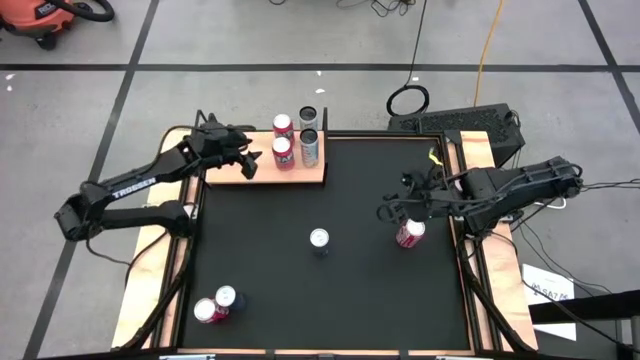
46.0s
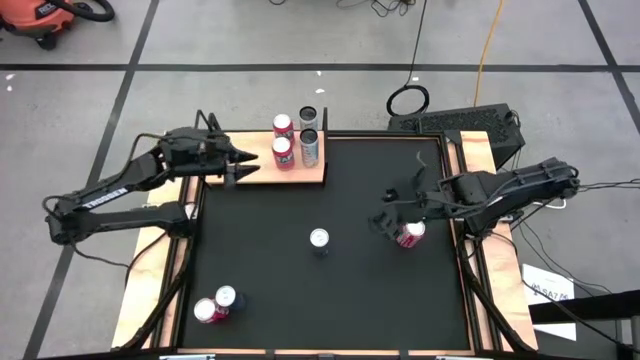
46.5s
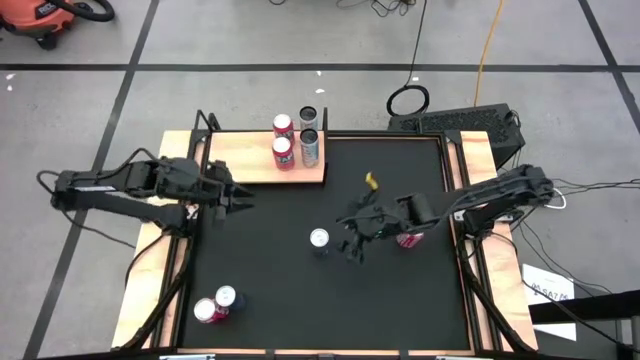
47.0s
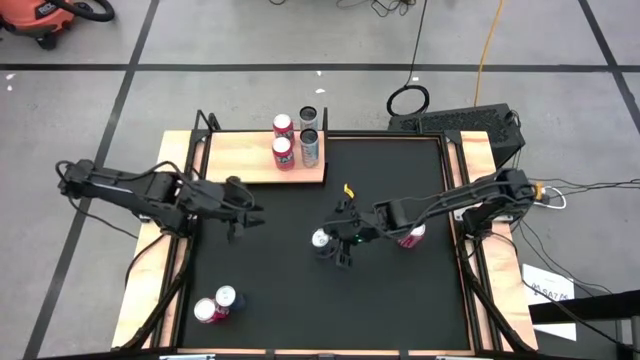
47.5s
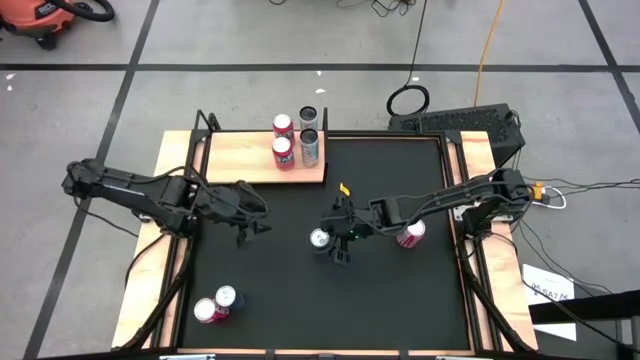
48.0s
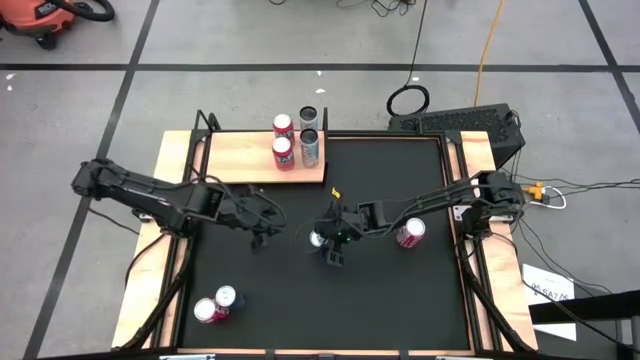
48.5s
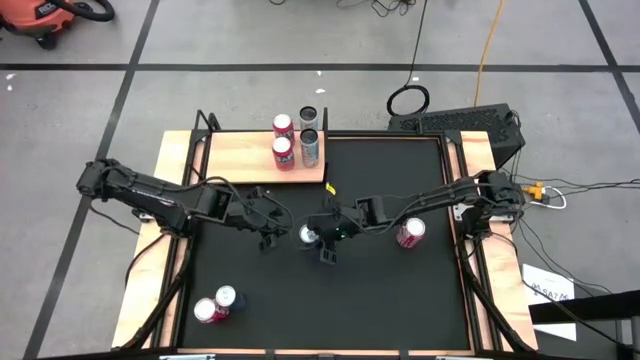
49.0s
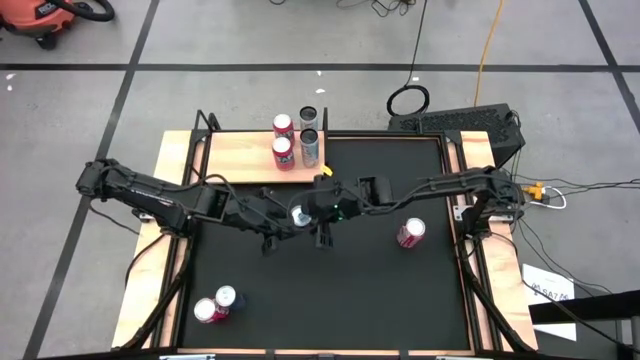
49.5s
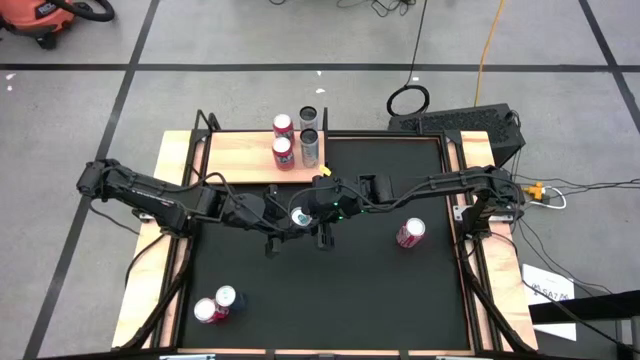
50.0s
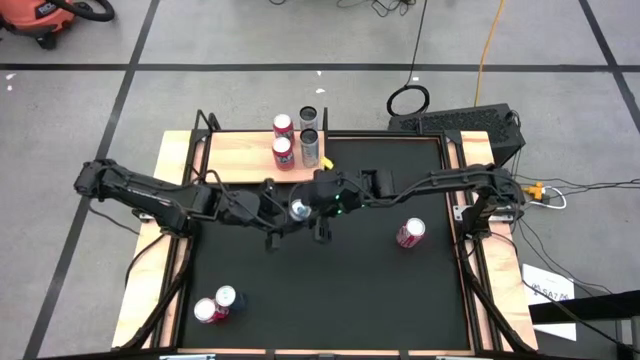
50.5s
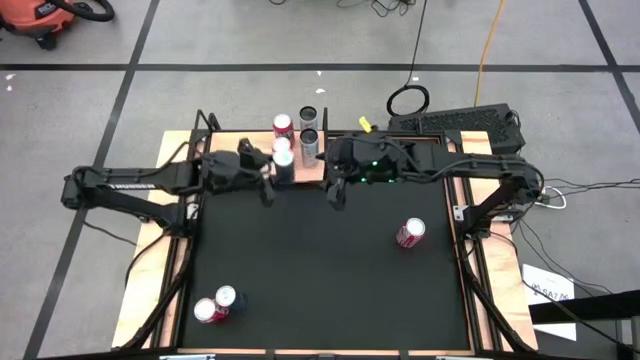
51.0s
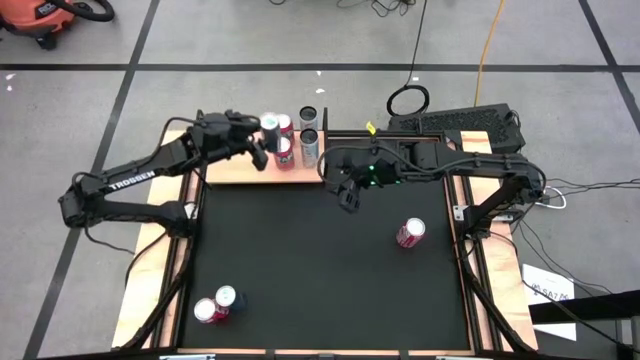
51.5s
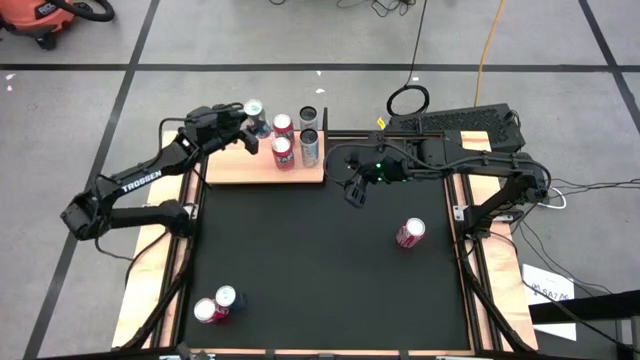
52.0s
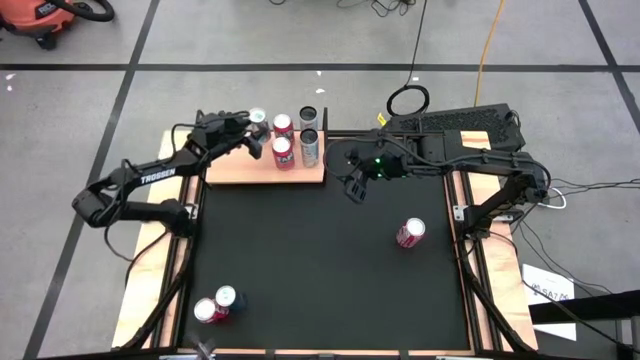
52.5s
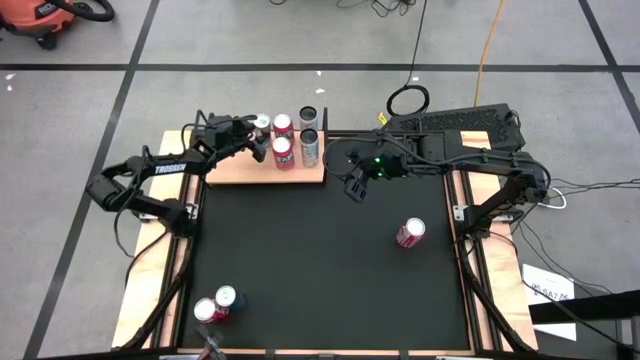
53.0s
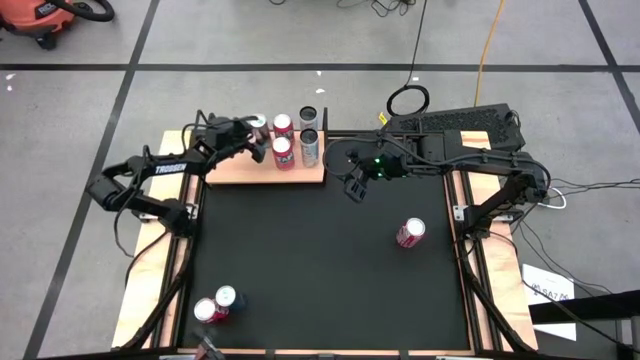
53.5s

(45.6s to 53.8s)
Task: Place canned beverage on shelf
Put the top blue soda can on the shelf

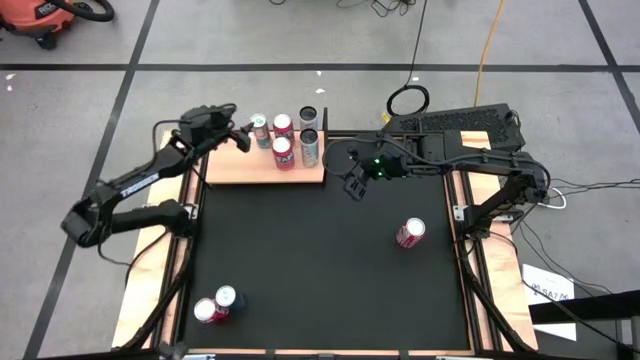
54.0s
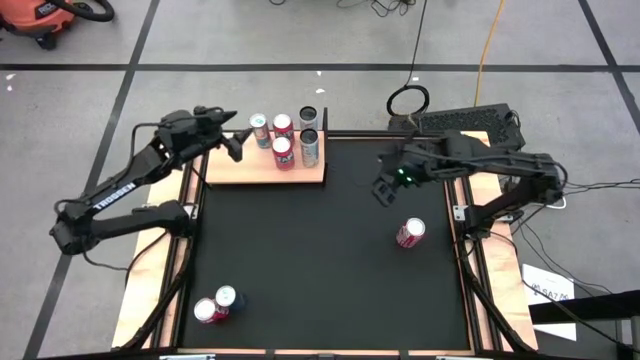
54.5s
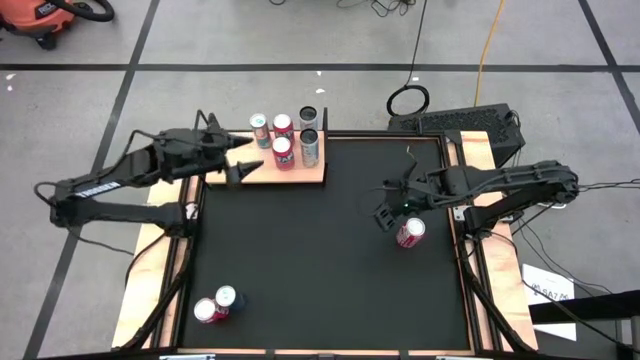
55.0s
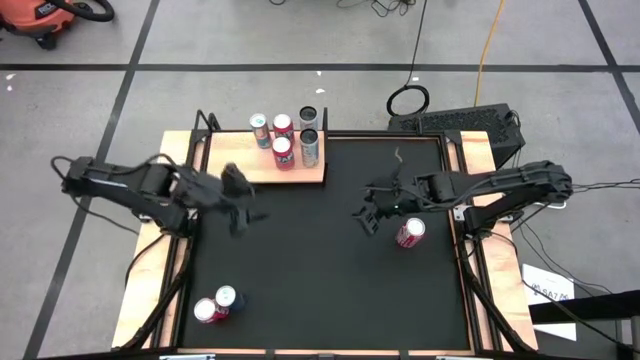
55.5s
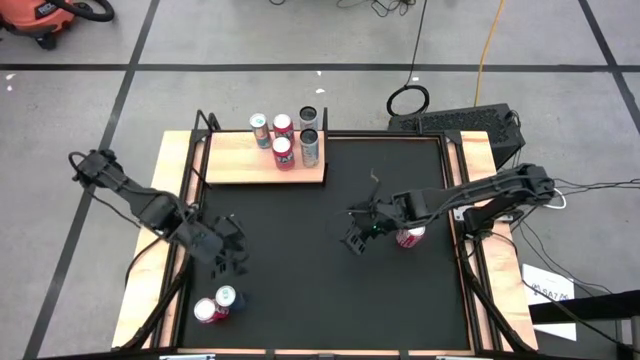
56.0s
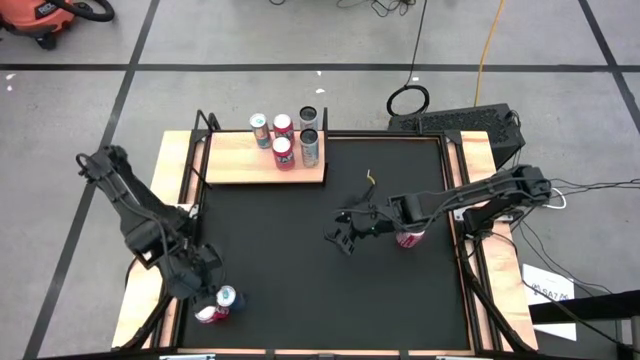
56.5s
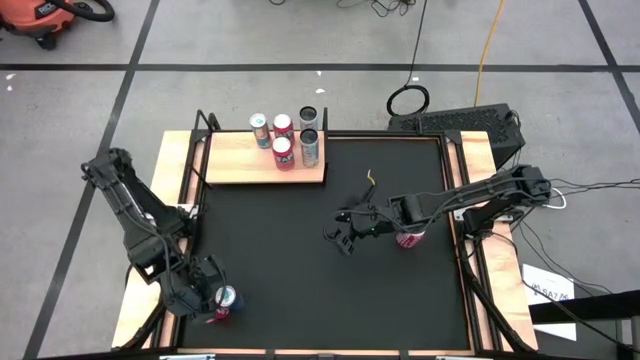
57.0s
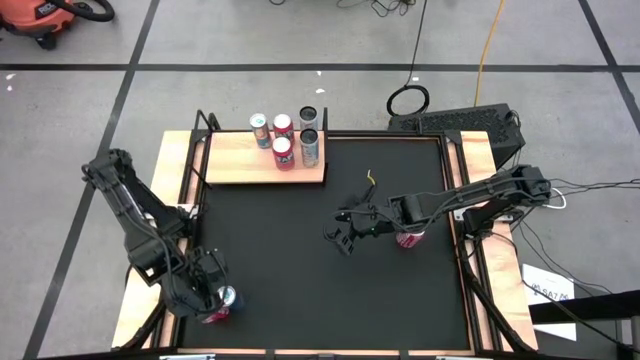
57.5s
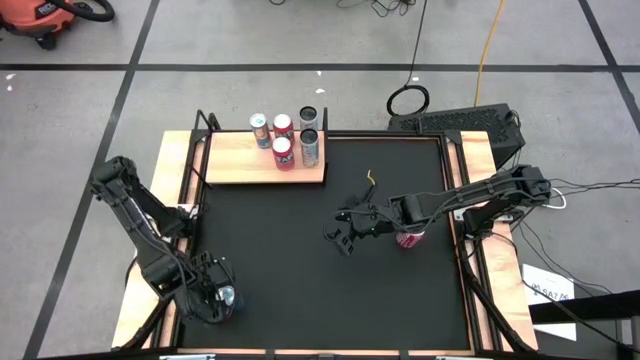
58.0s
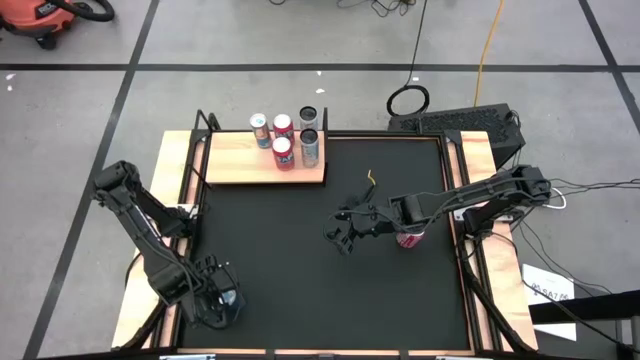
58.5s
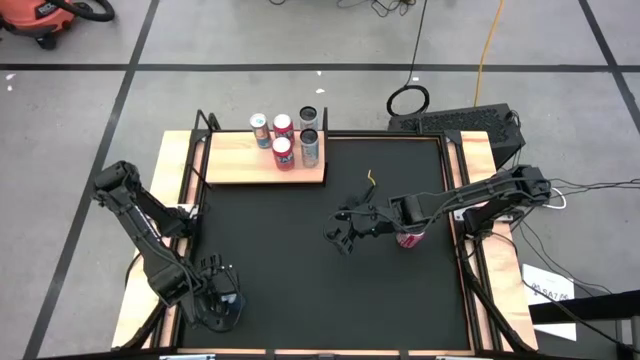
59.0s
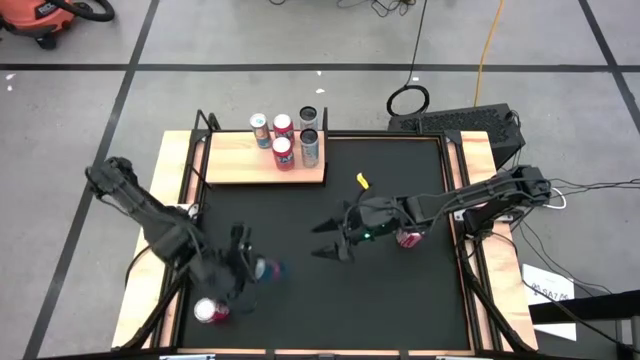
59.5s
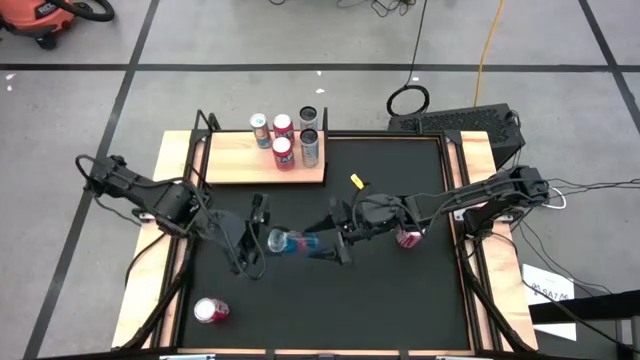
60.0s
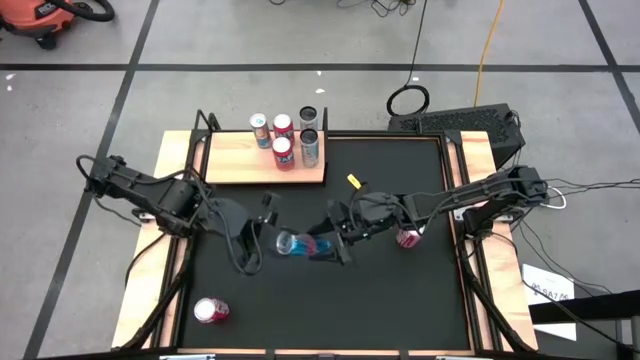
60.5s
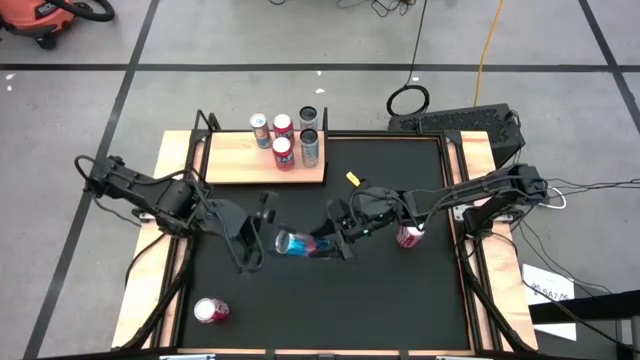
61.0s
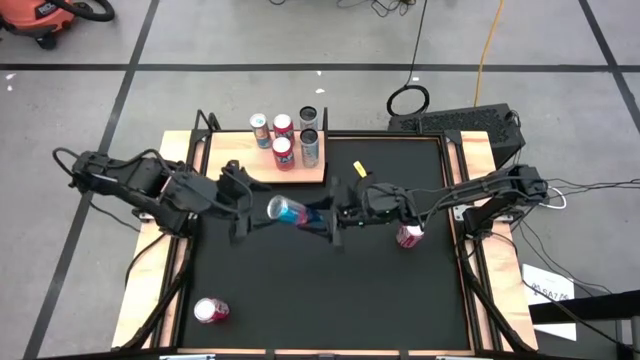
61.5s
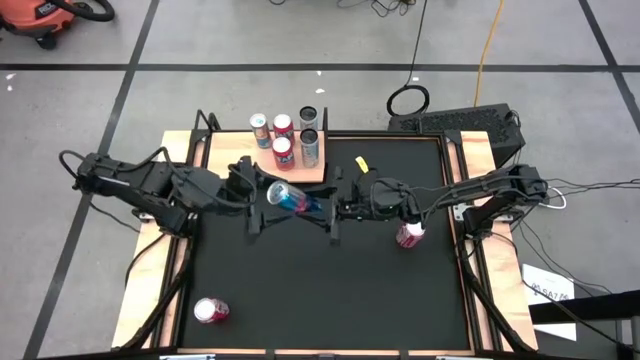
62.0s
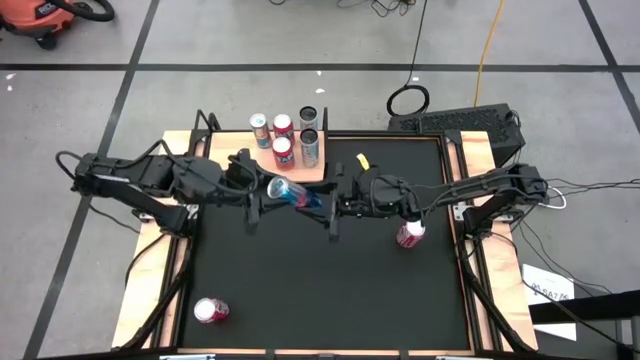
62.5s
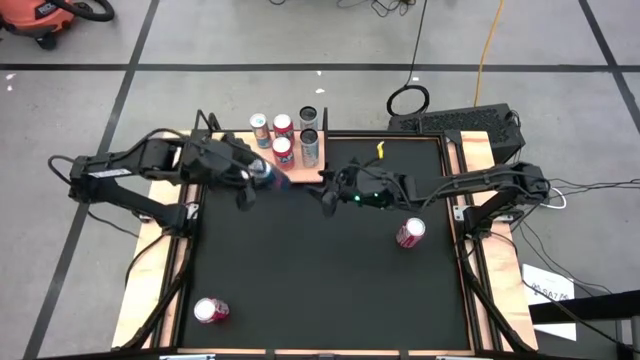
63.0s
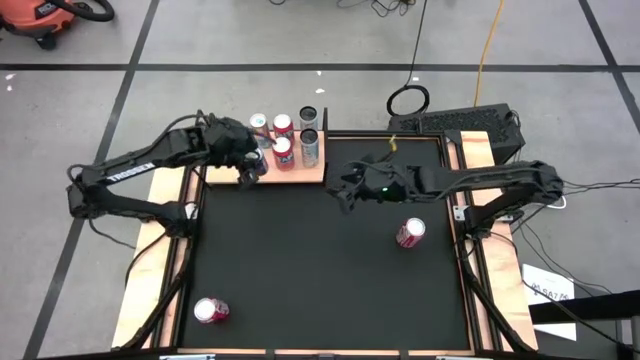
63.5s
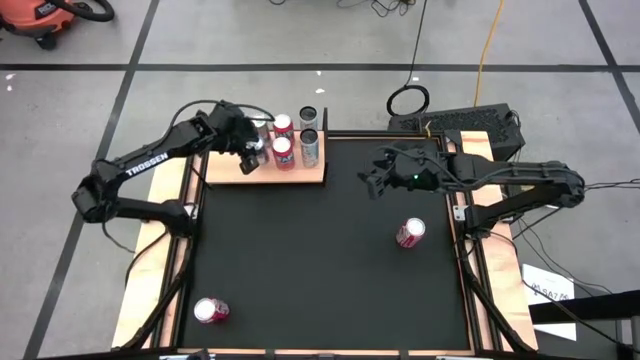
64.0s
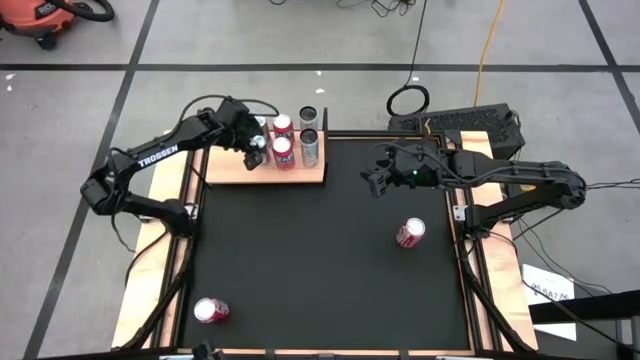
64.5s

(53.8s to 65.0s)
Put the blue soda can aligned with the other blue soda can on the shelf

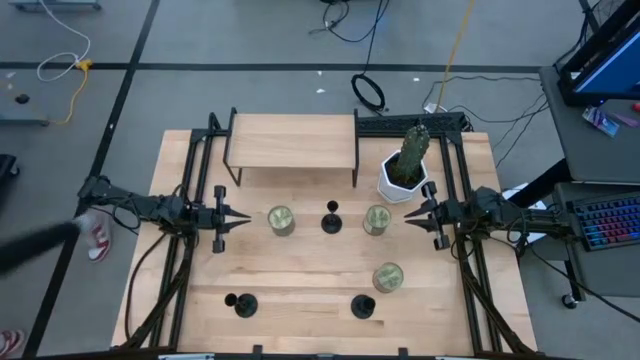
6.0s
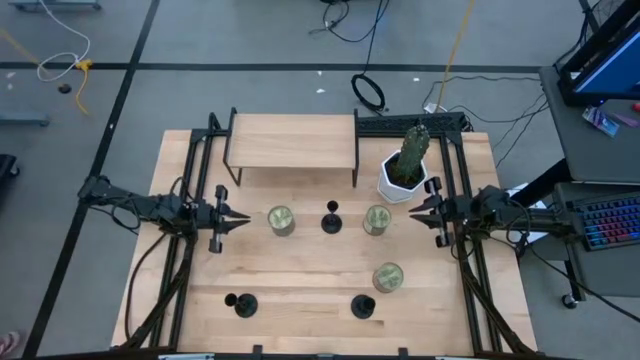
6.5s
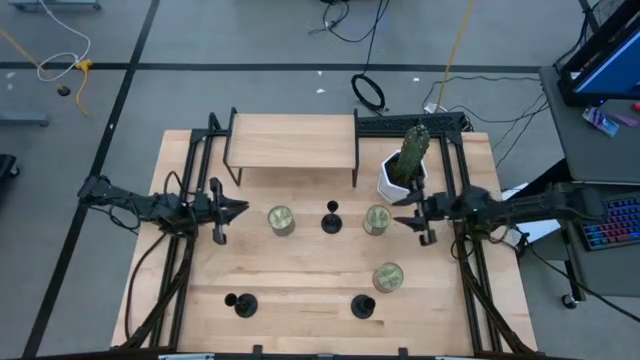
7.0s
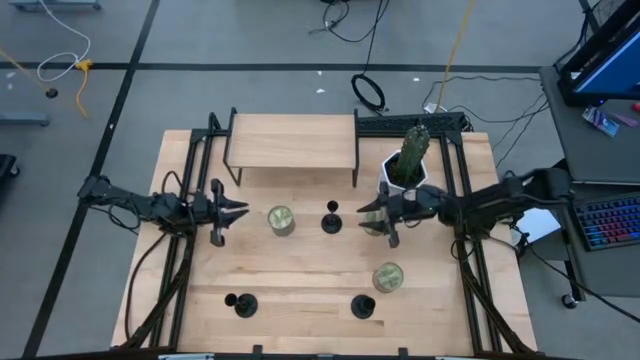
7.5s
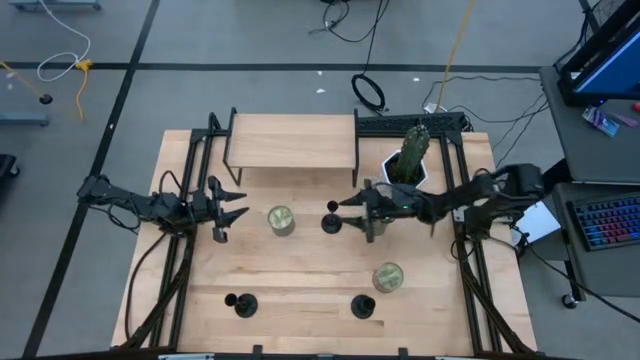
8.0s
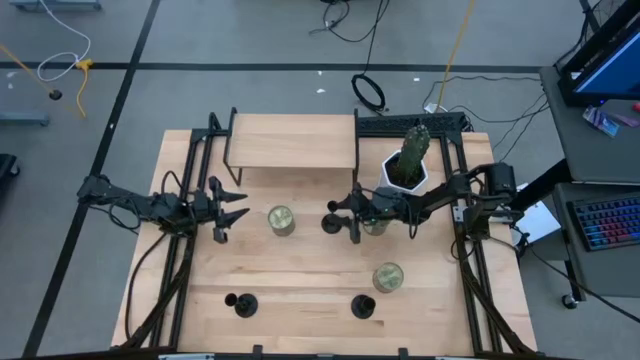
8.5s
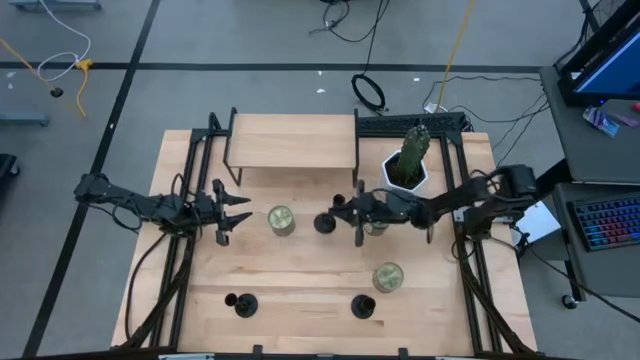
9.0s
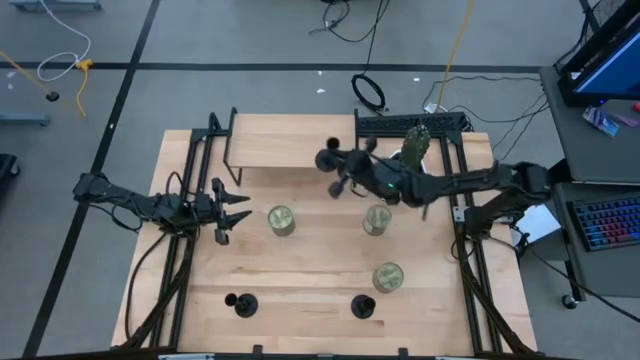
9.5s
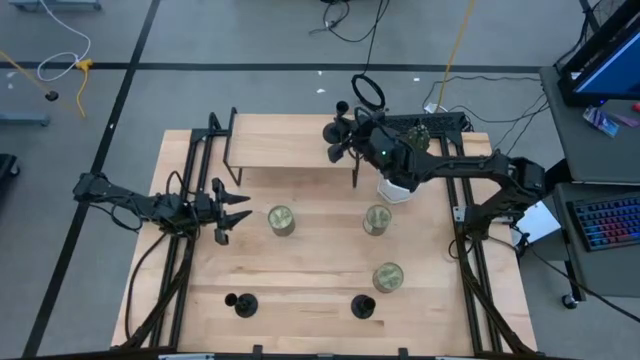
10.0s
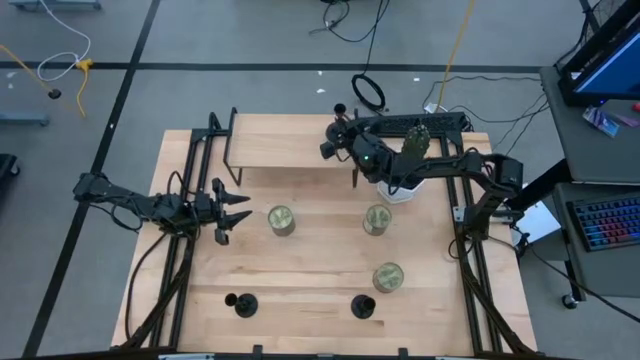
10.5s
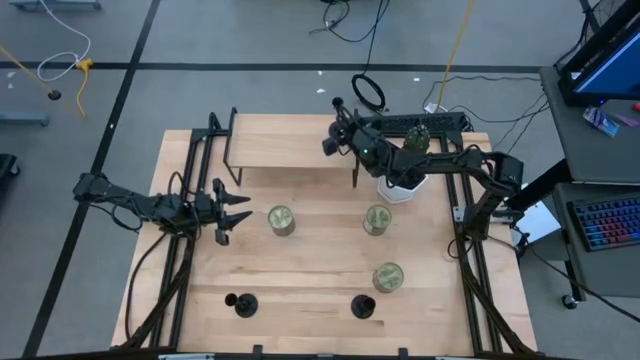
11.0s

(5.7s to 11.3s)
Task: Pick & Place candle stick holders
Put the black candle holder on the shelf
